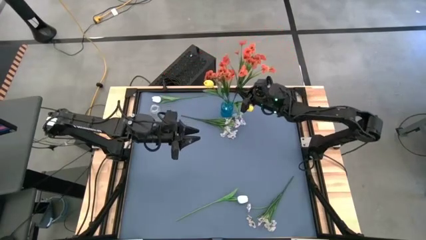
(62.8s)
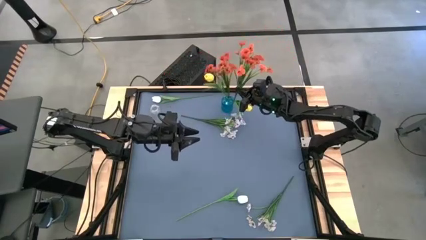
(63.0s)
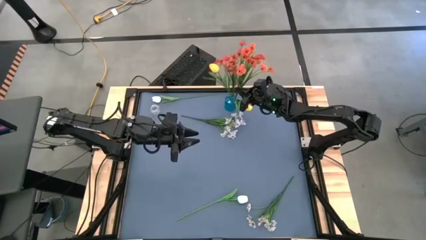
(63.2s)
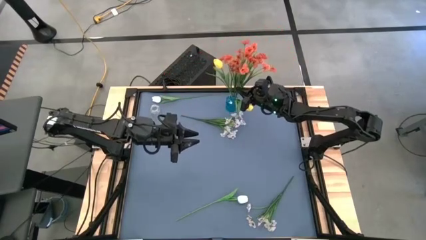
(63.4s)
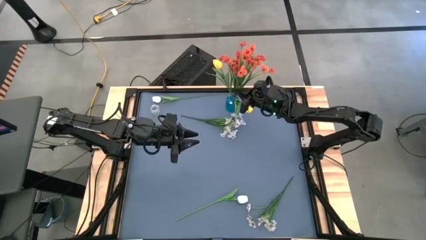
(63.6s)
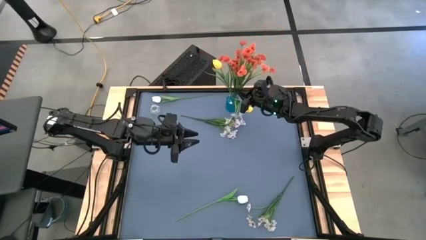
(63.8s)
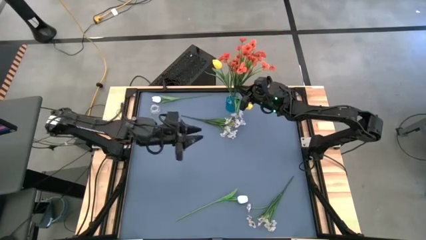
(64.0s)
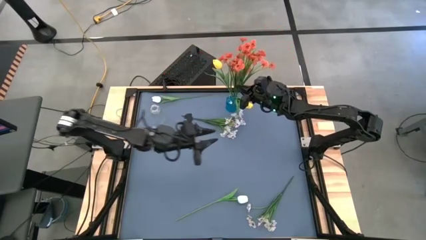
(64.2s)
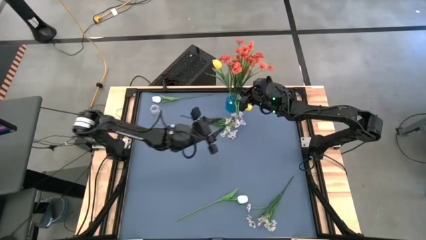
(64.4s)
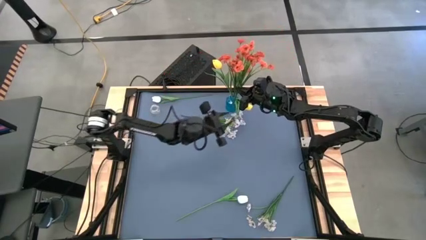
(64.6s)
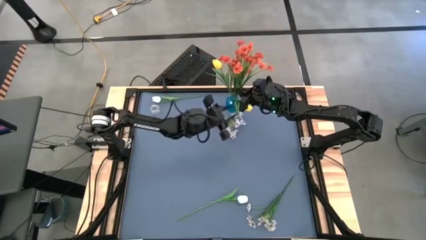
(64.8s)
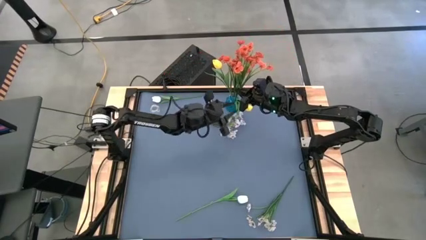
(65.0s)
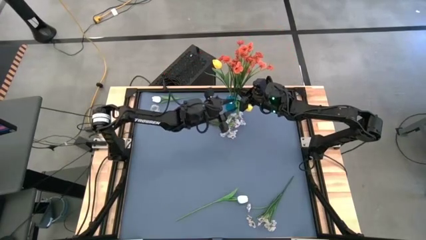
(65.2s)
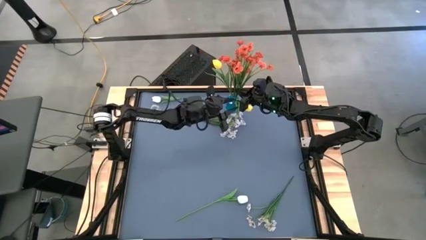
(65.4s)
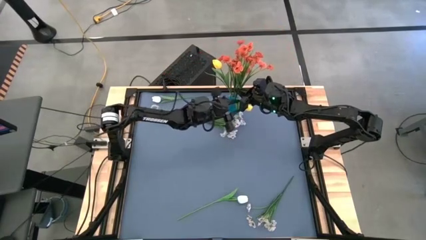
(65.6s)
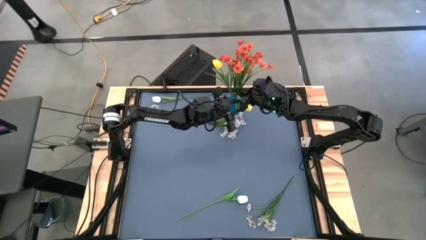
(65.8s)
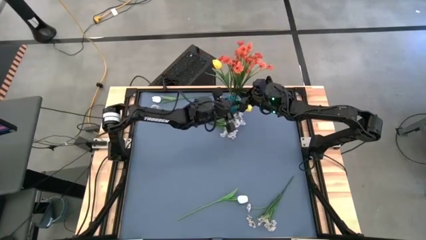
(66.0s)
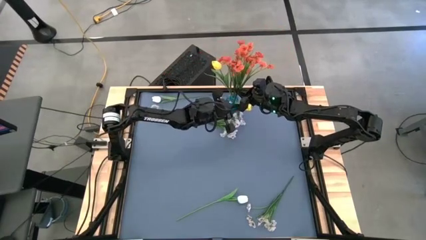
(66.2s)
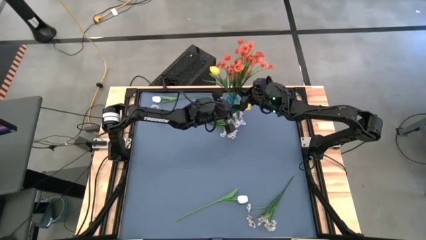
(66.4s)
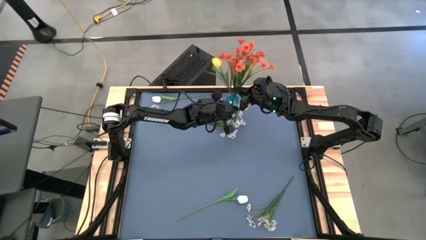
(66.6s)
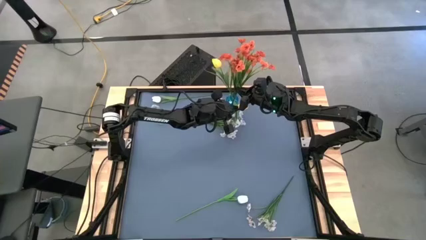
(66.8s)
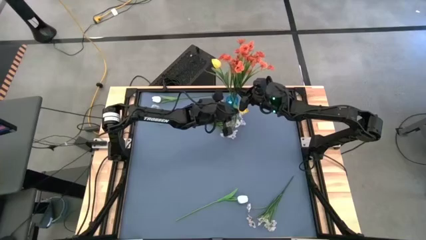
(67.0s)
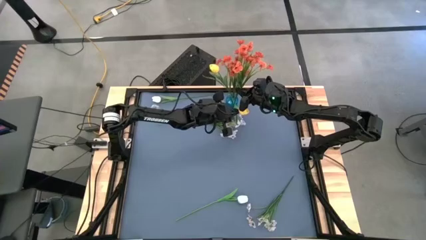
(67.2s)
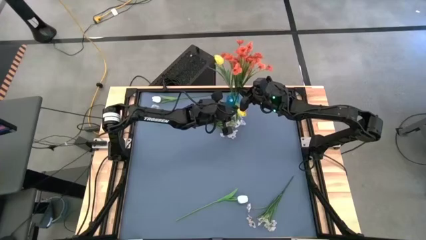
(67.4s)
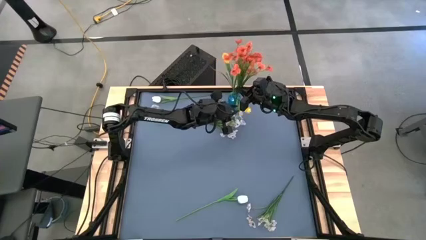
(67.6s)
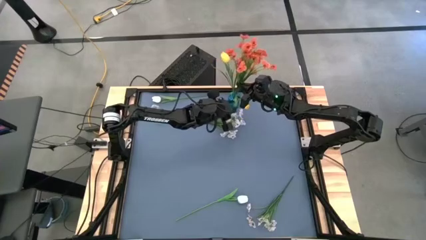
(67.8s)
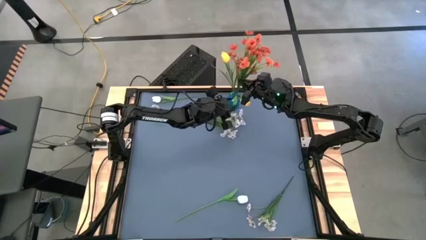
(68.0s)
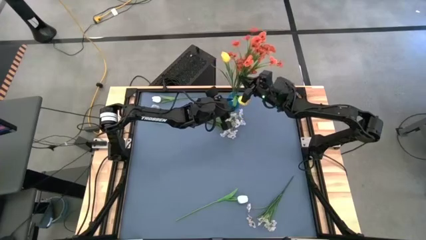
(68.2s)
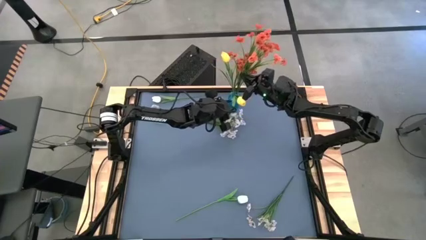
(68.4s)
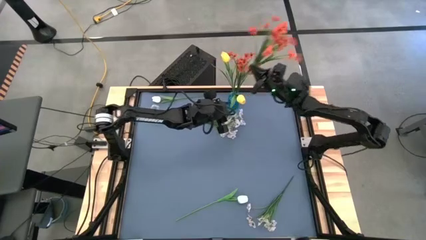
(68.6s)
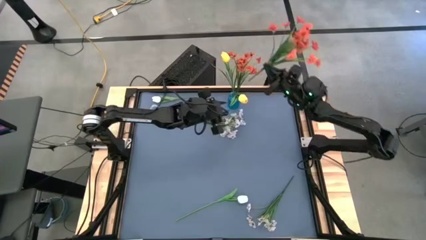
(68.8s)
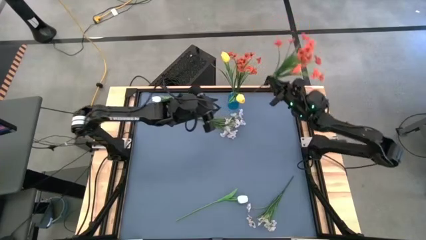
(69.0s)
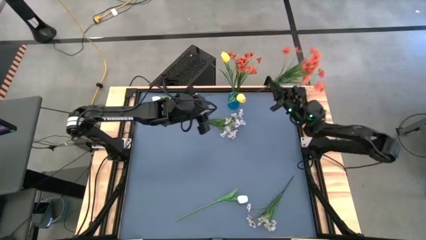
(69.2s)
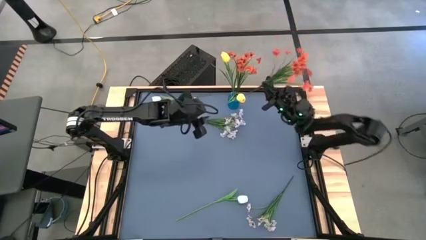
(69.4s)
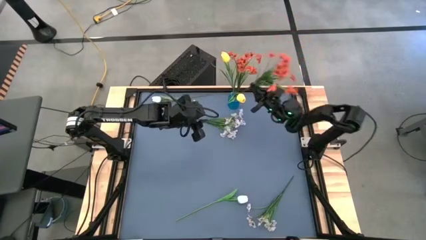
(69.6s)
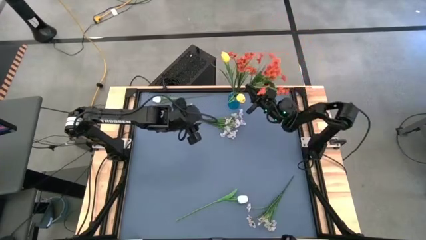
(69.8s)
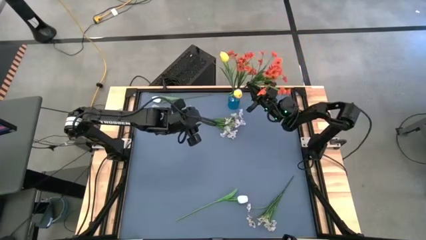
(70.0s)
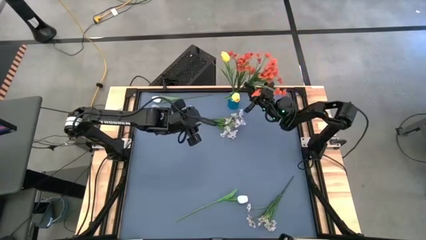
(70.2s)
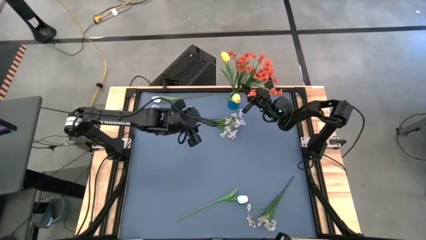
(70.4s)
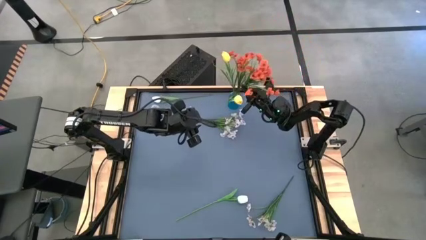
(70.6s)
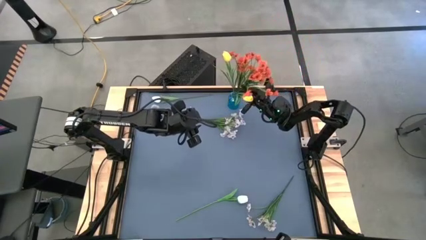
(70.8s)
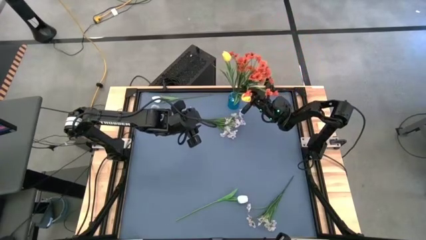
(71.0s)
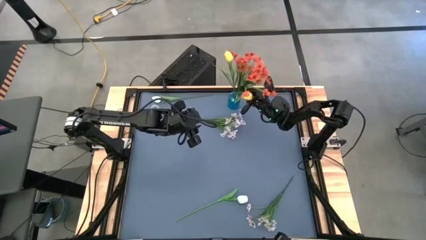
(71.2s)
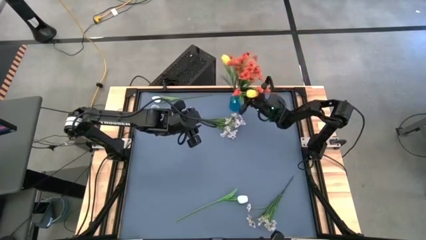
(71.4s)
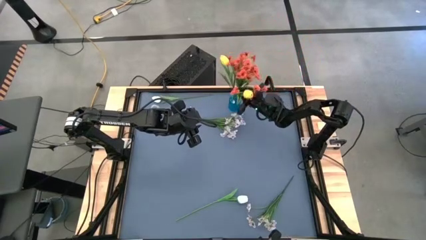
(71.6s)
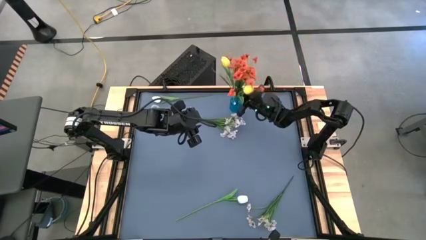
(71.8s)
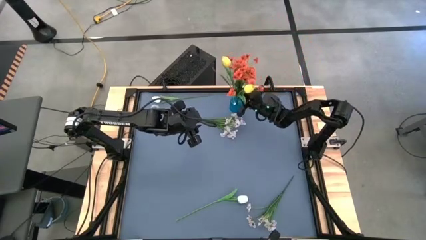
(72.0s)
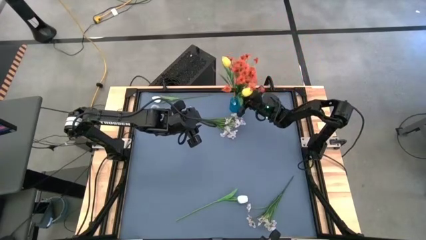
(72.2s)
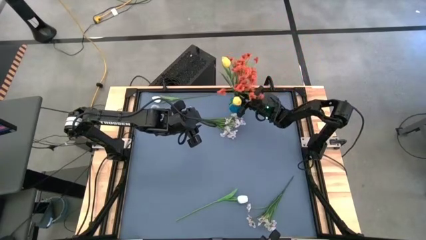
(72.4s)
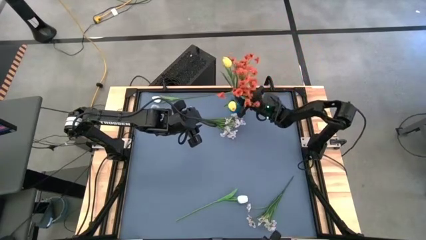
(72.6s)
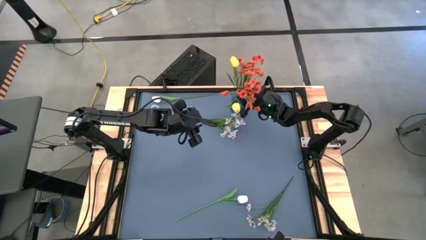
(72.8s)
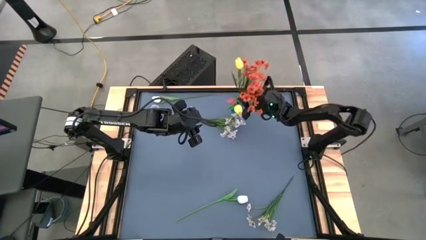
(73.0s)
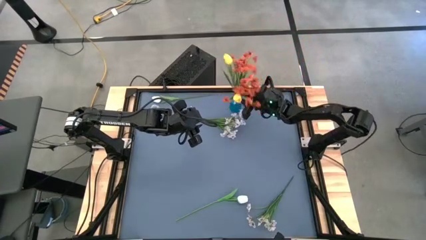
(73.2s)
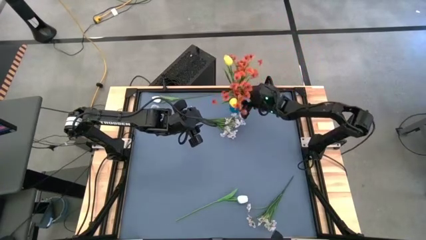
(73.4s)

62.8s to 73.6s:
Task: Sort flowers into vase by color
Put the orange flowers into the blue vase

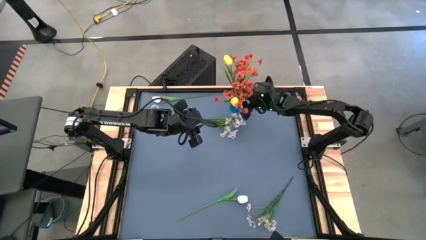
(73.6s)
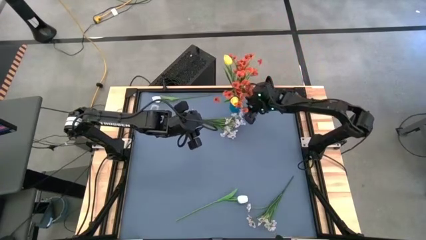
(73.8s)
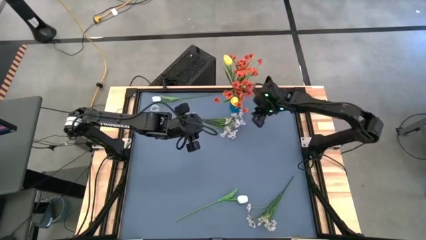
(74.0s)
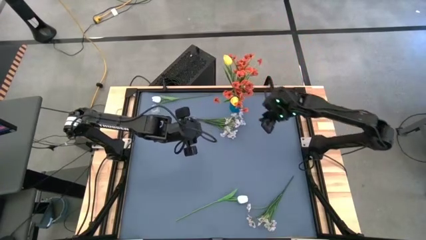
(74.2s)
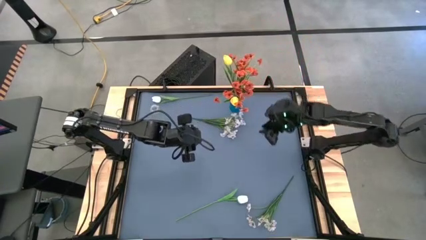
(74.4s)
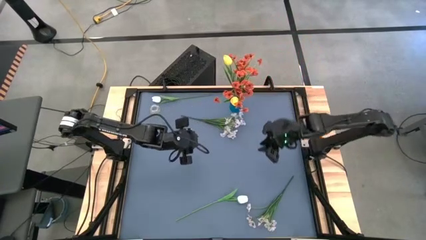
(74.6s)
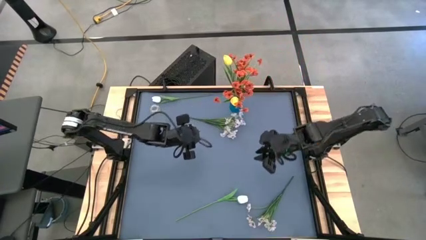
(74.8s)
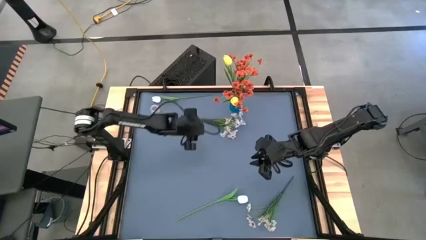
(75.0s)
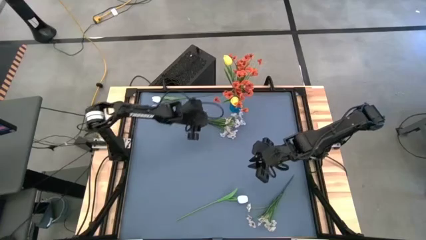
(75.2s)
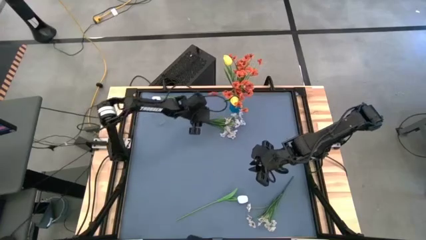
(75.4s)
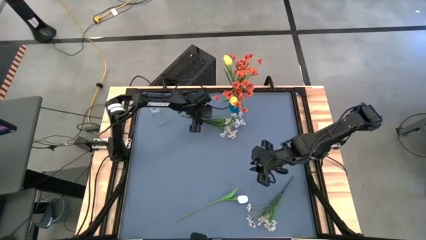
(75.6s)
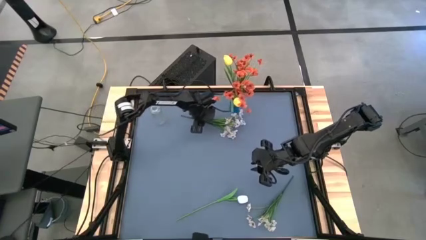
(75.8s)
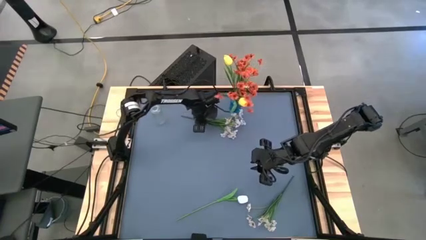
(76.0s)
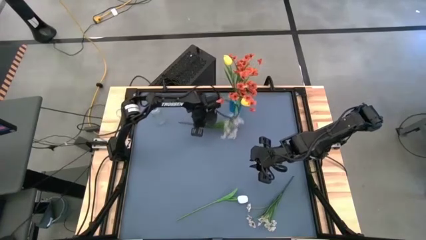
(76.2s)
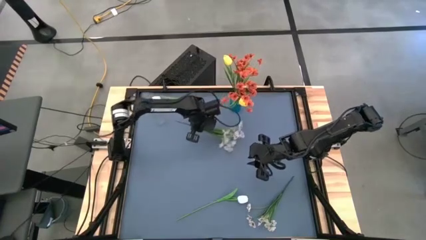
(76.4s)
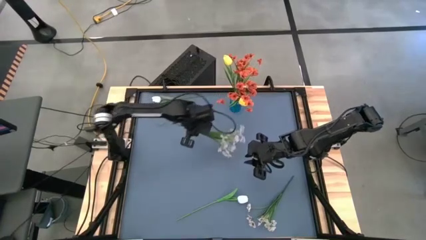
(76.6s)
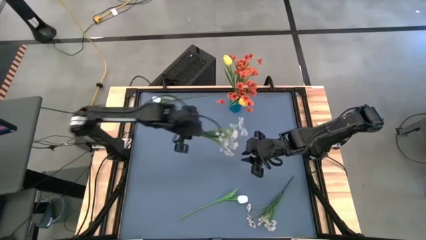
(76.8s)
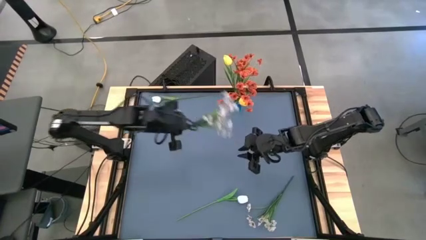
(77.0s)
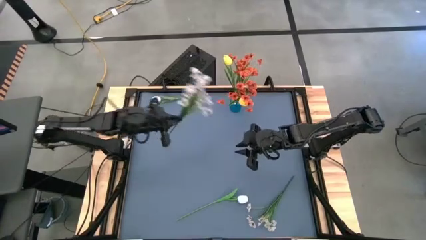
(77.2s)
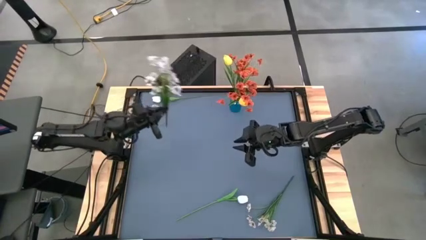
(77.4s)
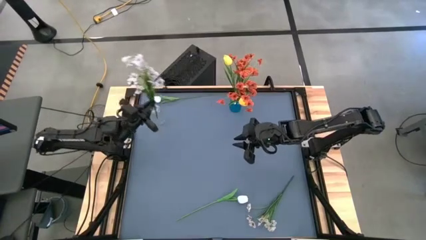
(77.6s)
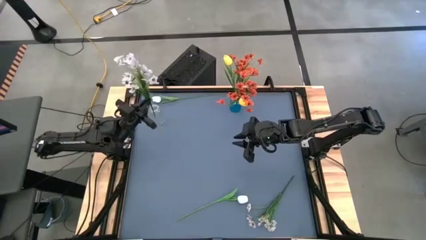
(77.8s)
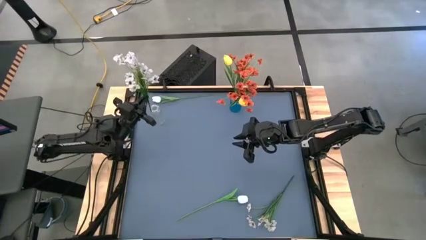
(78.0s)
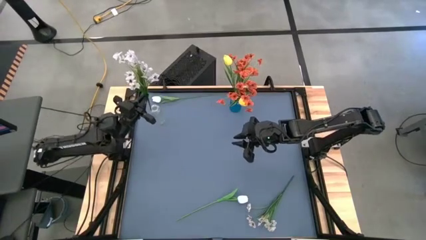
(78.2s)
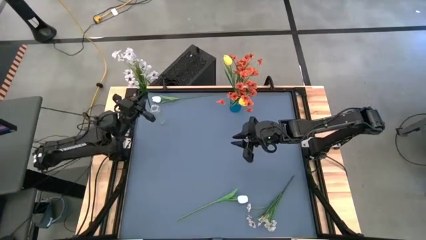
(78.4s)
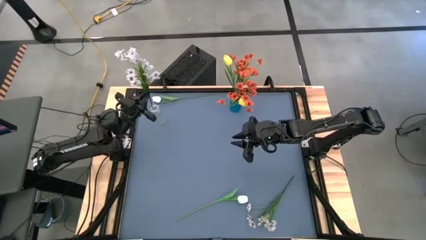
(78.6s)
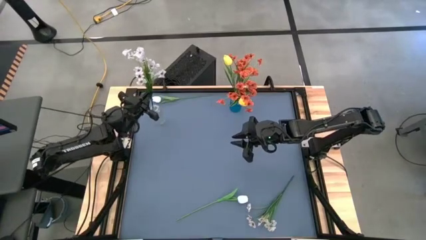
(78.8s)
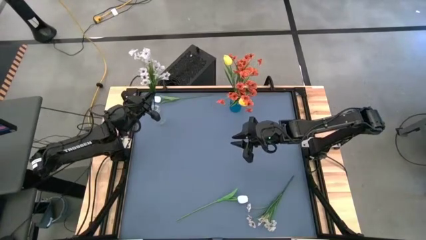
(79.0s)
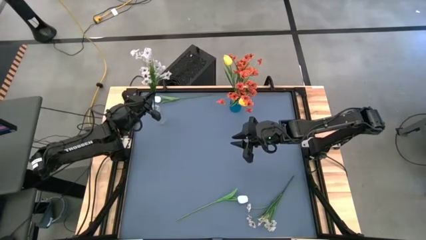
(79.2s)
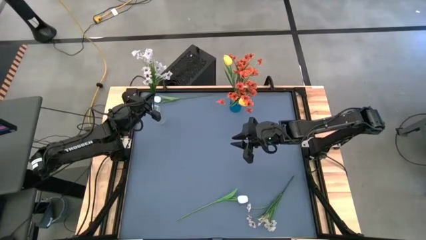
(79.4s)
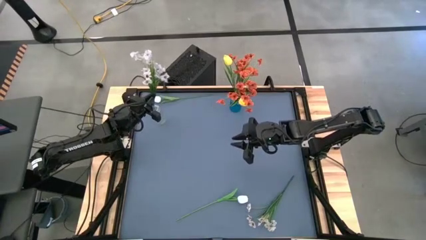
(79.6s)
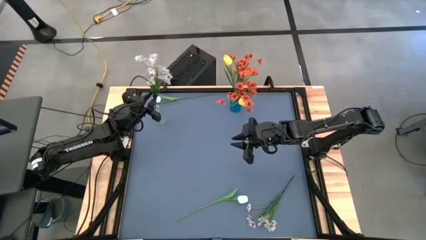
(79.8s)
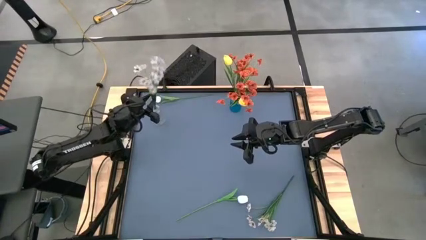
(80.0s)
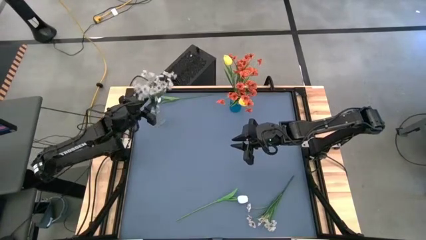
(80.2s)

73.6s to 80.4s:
Put the top white flowers into the transparent vase
